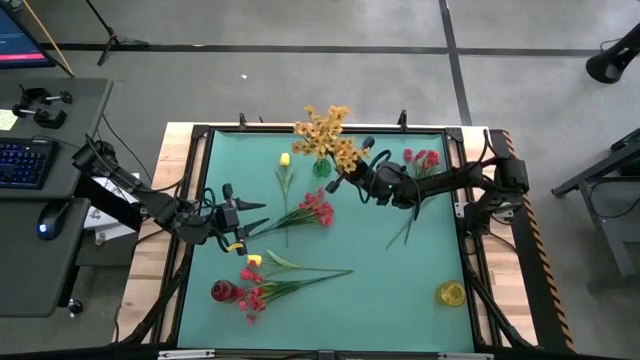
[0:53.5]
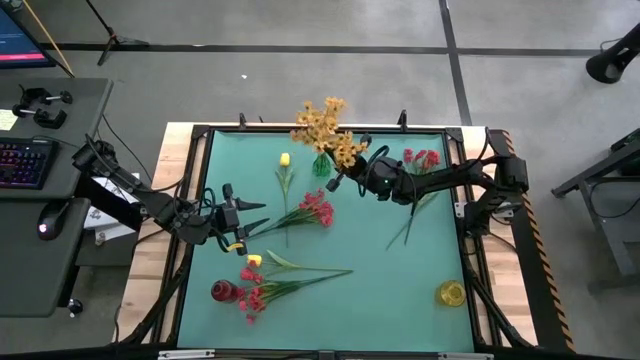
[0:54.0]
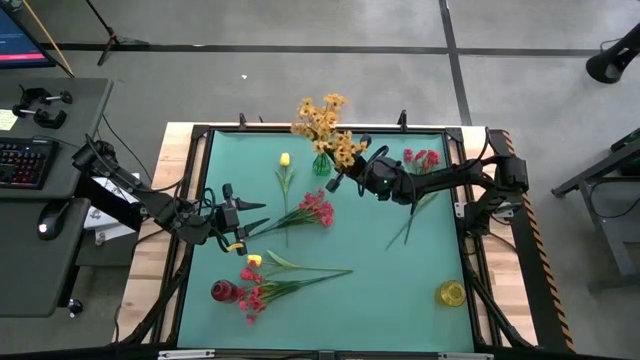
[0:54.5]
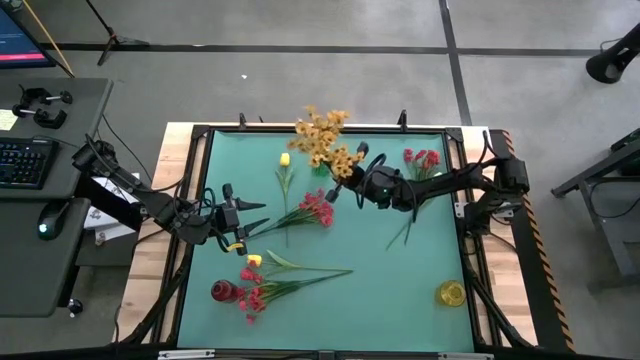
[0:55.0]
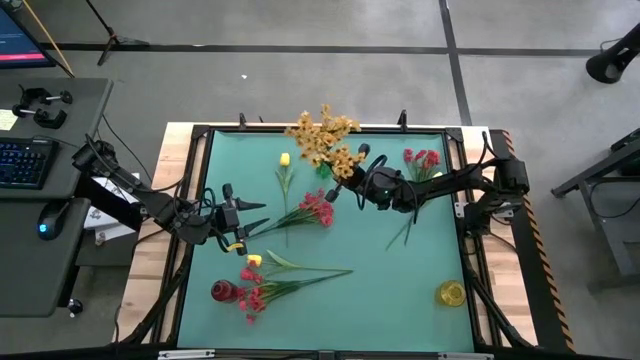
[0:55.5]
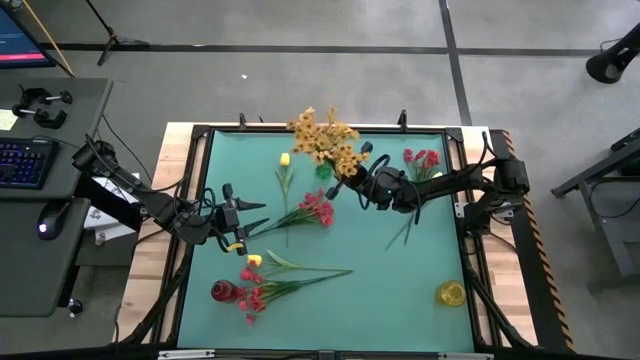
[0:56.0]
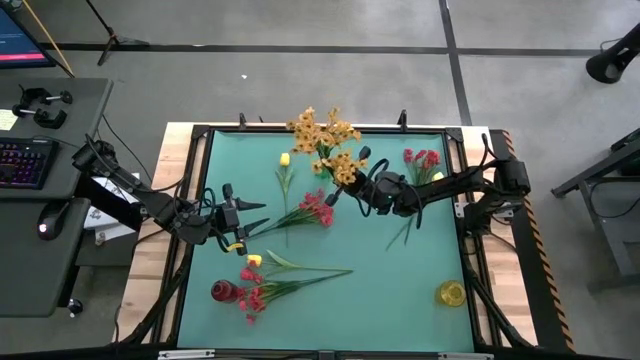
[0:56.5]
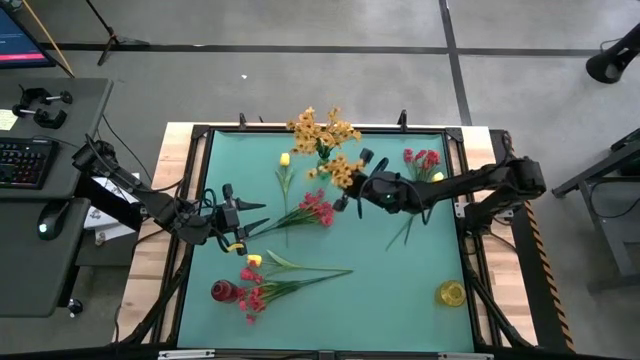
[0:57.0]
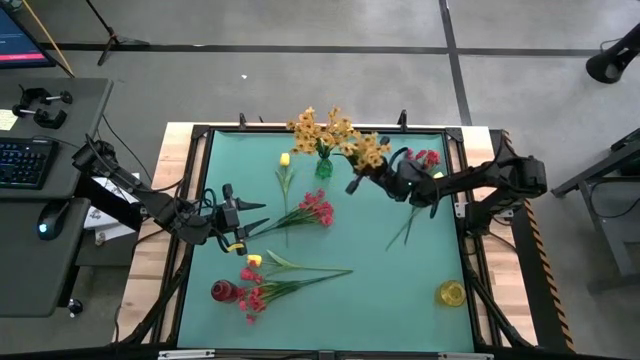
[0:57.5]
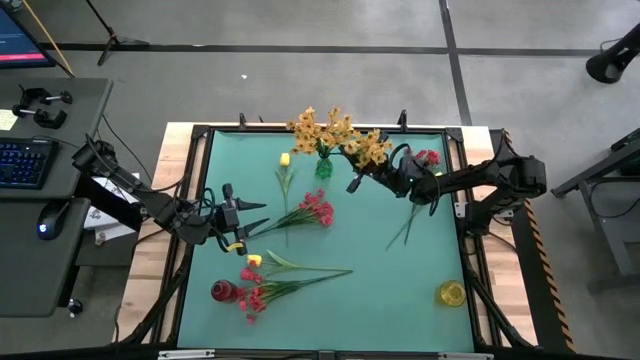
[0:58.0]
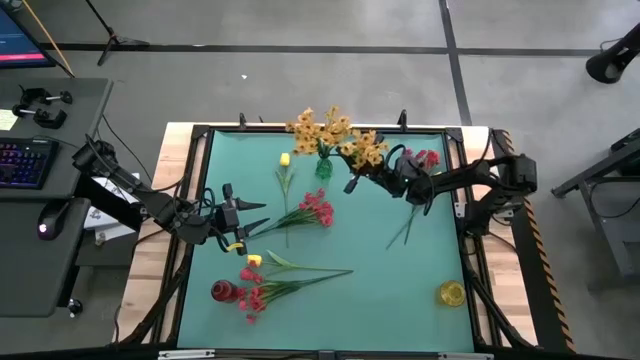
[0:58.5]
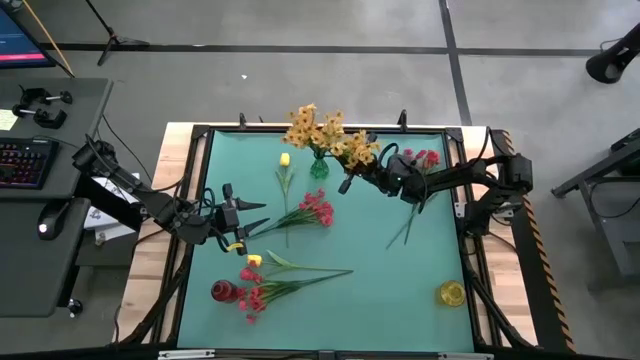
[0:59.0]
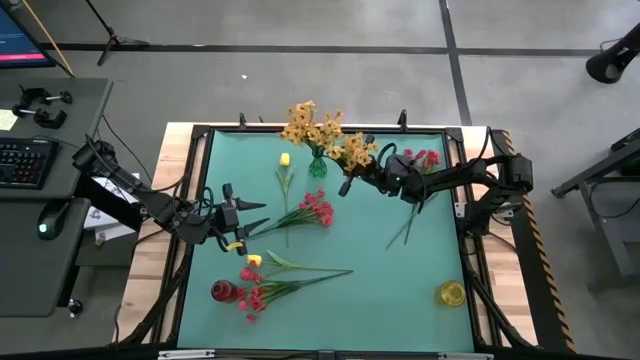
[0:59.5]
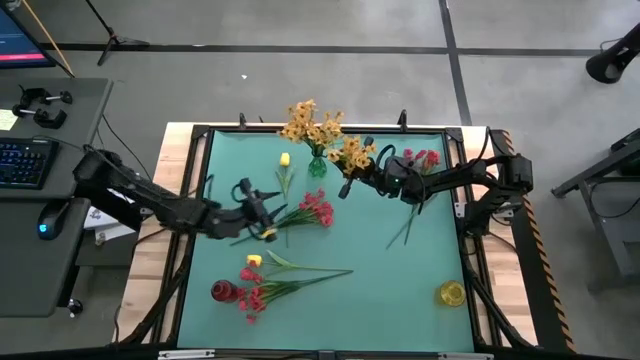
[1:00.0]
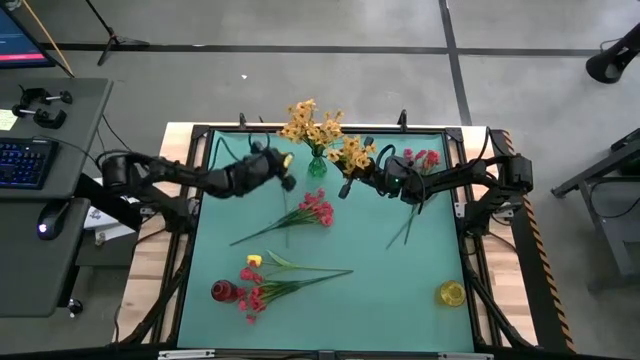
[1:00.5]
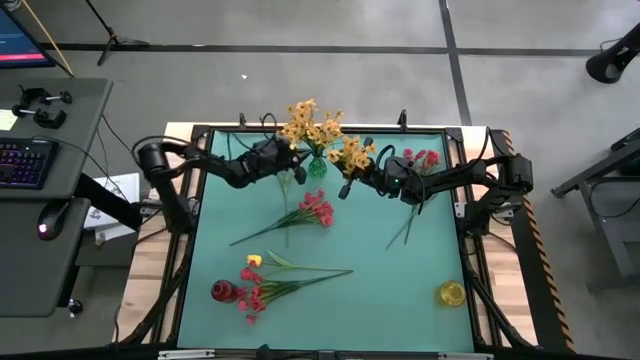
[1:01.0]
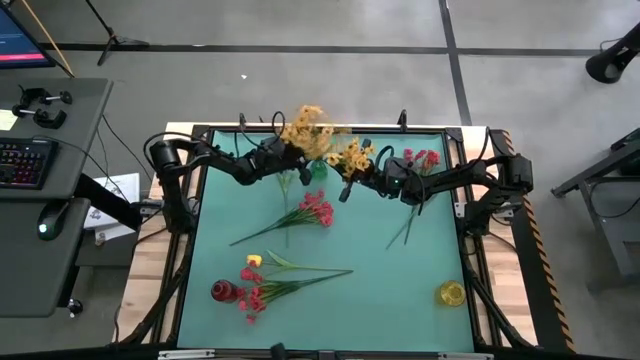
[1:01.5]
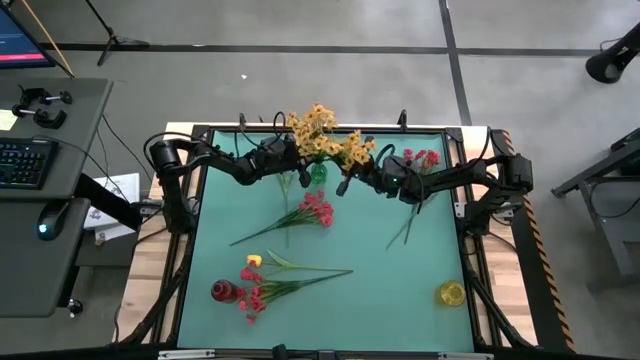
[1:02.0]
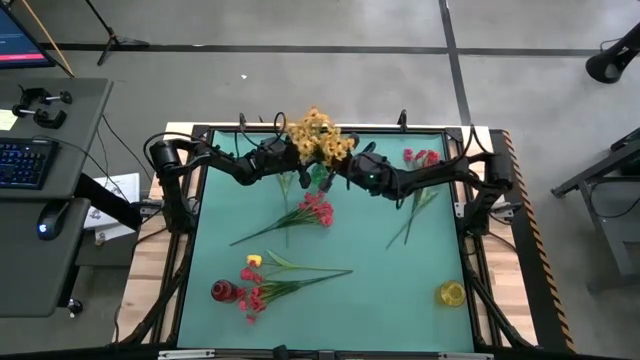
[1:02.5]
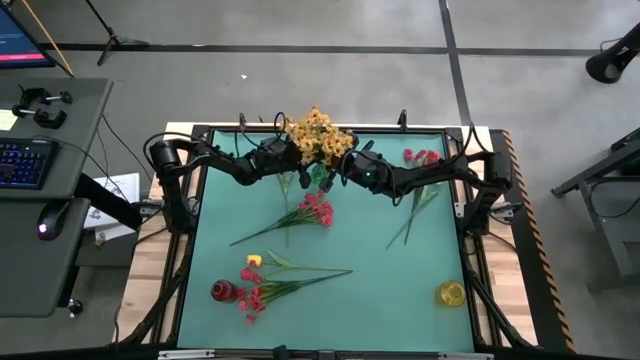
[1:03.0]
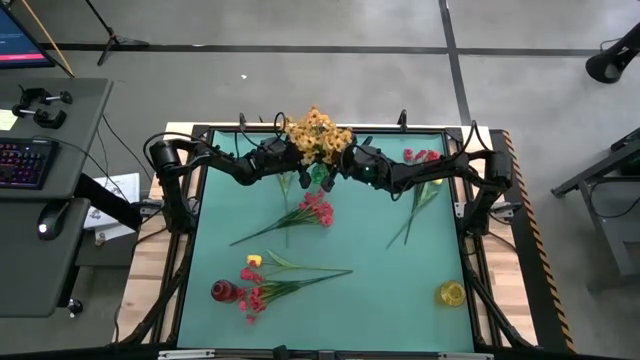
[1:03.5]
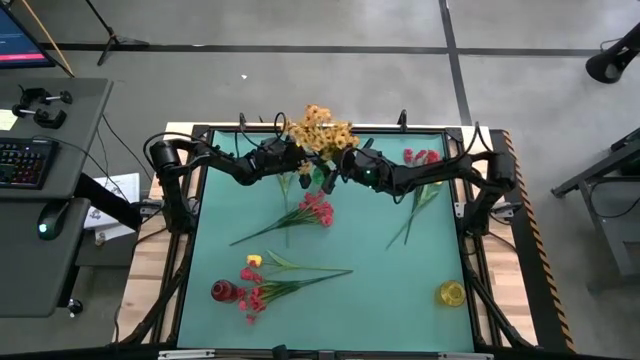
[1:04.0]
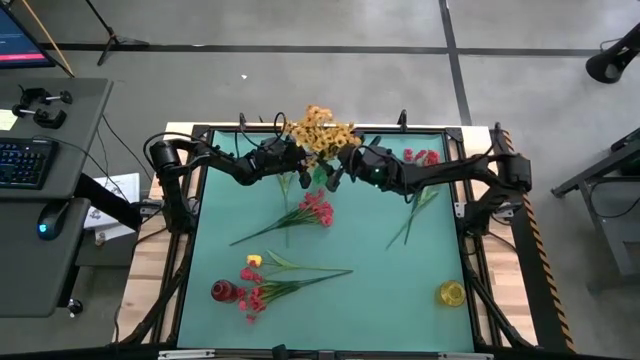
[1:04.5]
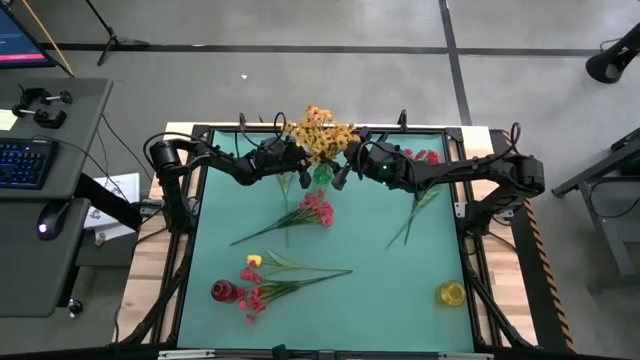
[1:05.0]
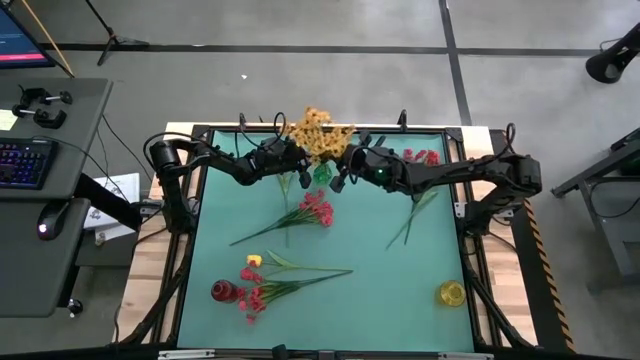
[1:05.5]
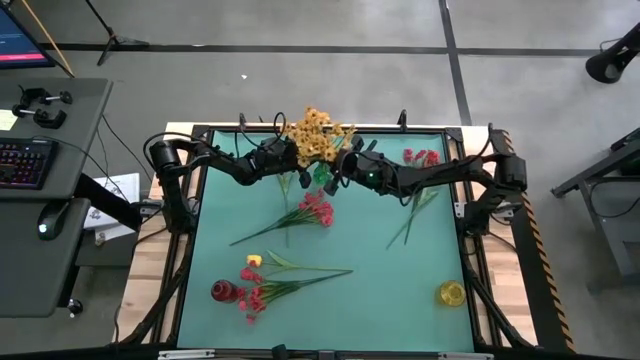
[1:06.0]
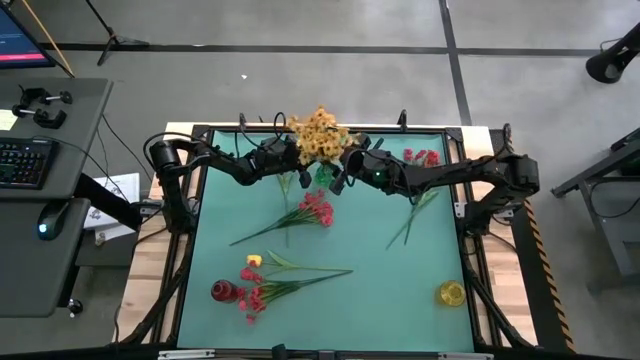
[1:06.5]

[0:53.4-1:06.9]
Task: Sort flowers into vase by color
Put the yellow flower into the green vase

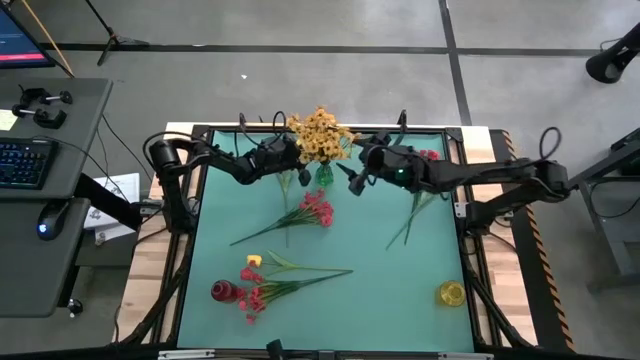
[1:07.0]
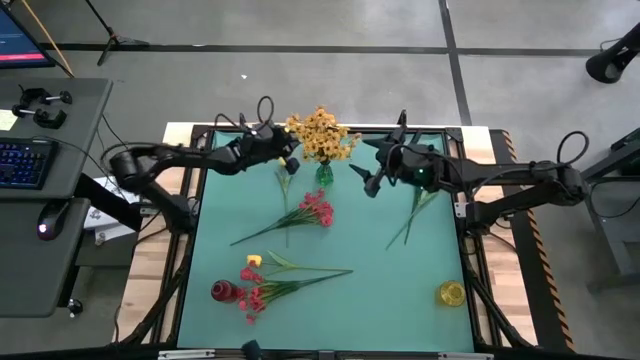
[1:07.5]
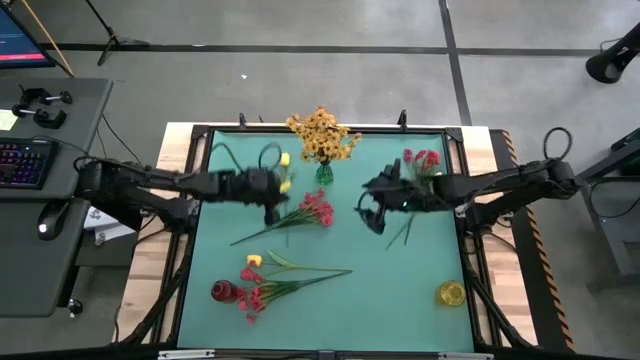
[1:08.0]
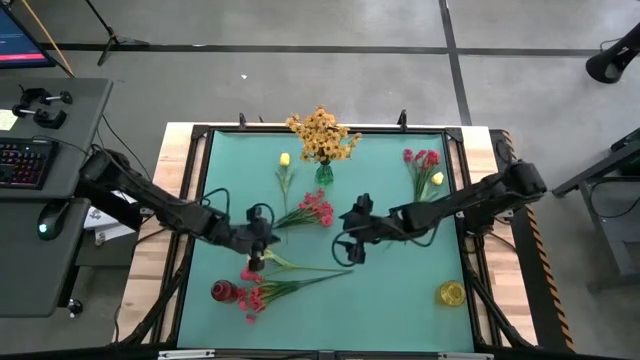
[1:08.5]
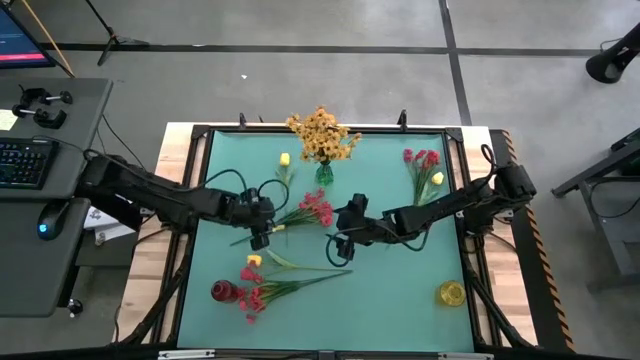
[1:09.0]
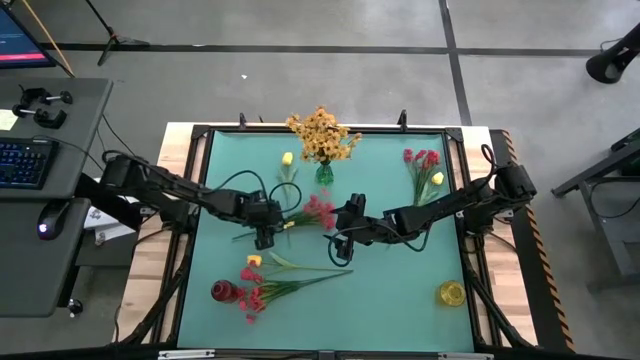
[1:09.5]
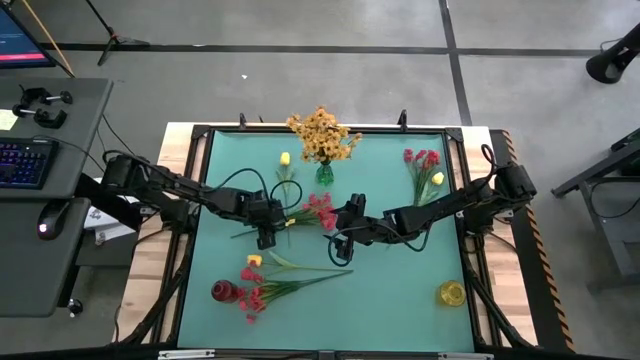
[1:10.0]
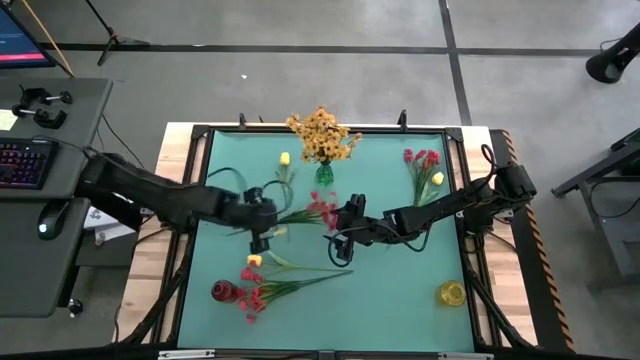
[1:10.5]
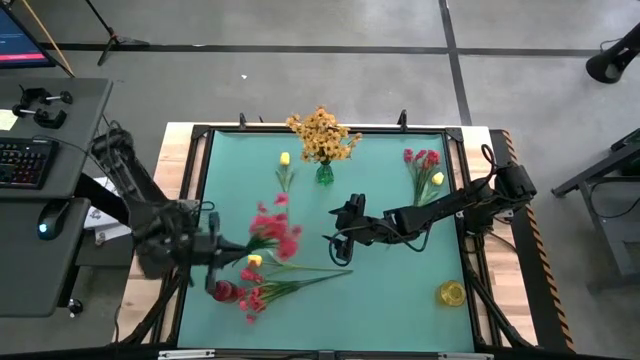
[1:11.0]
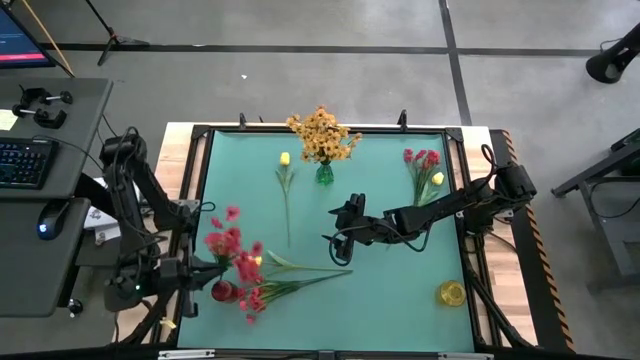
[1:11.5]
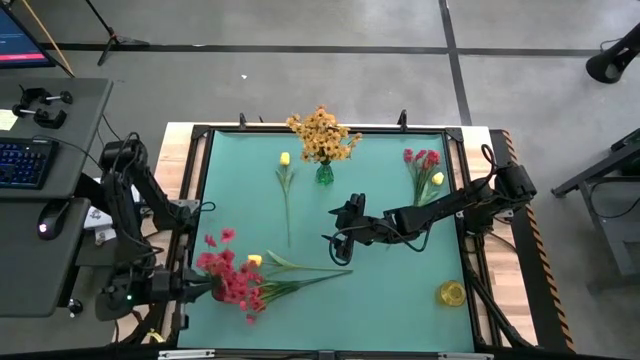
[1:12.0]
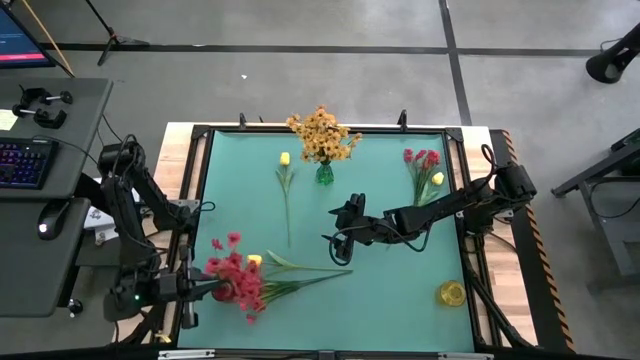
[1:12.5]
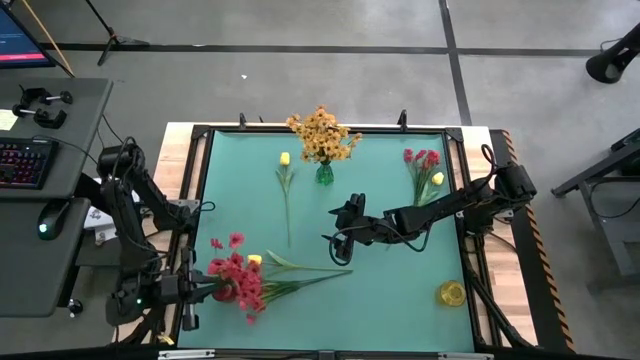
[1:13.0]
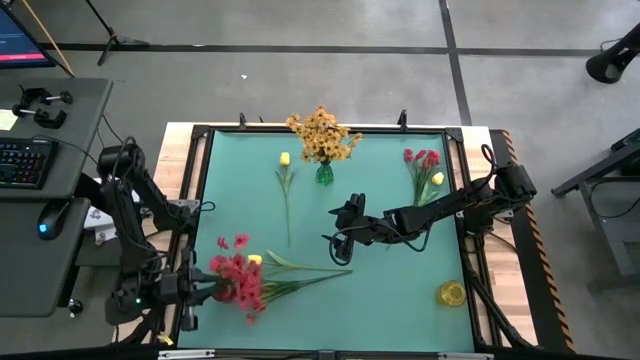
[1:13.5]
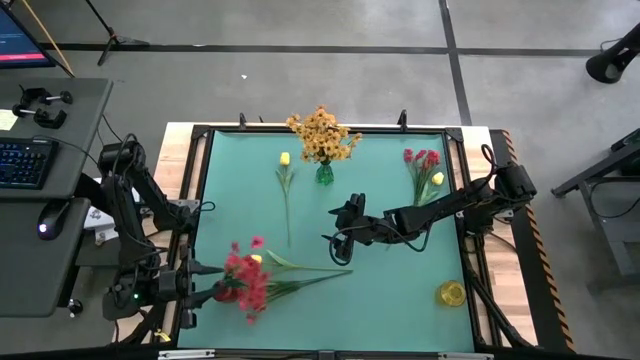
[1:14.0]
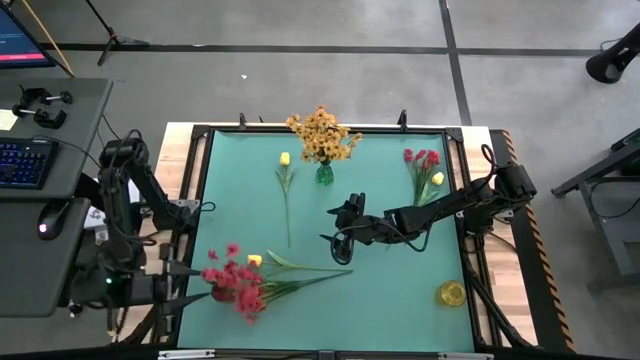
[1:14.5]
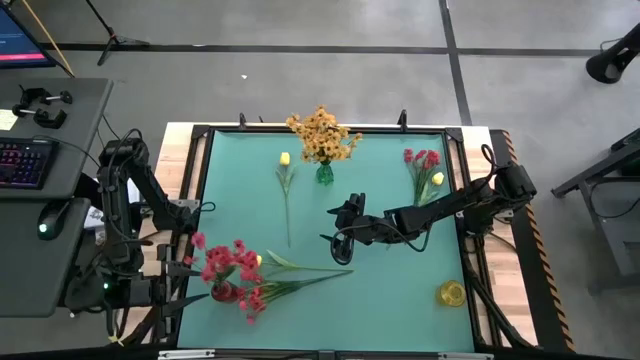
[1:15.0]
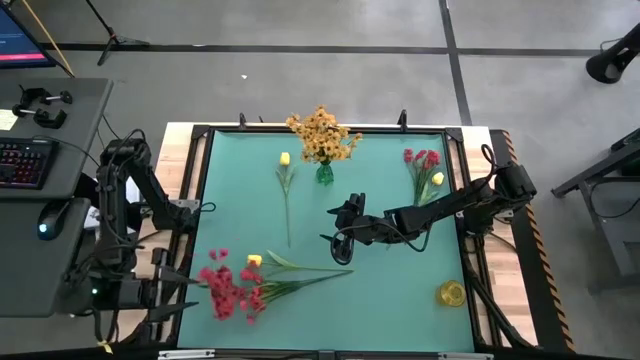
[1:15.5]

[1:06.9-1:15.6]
Put the middle red flower into the red vase
